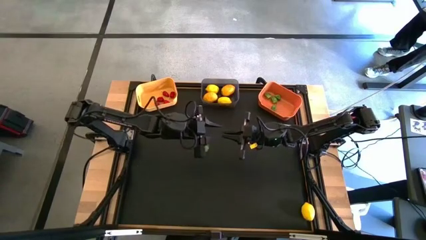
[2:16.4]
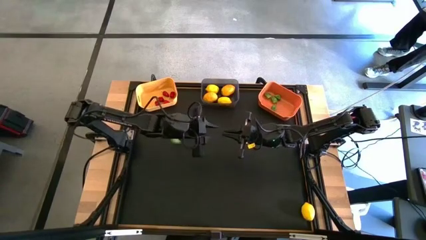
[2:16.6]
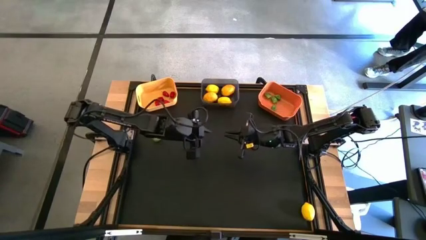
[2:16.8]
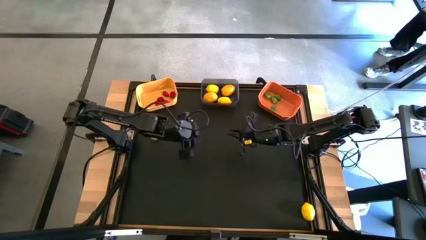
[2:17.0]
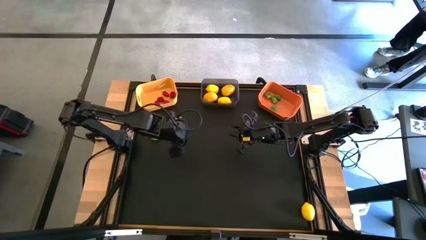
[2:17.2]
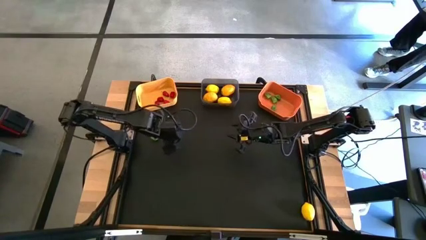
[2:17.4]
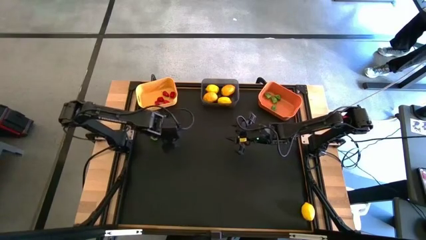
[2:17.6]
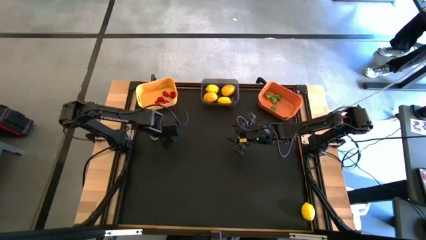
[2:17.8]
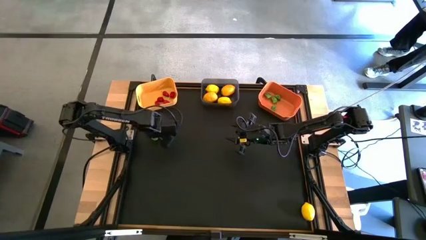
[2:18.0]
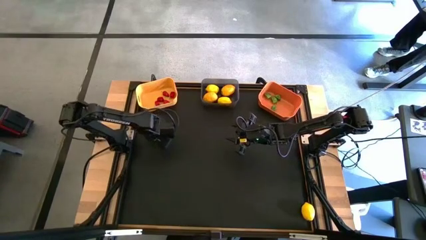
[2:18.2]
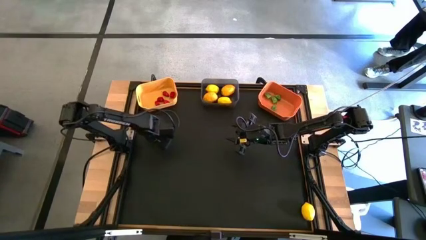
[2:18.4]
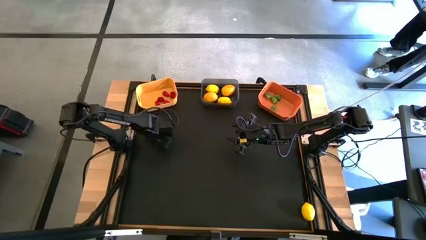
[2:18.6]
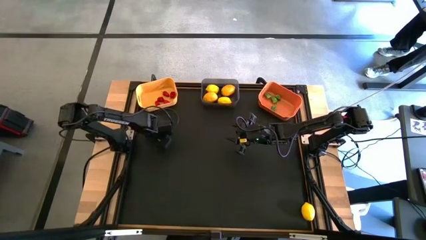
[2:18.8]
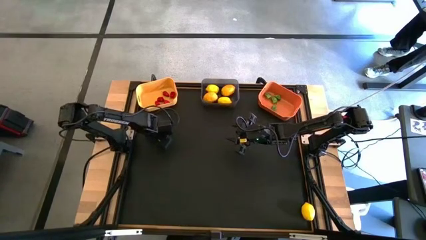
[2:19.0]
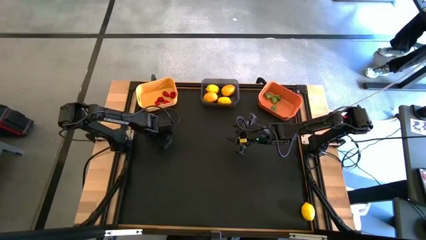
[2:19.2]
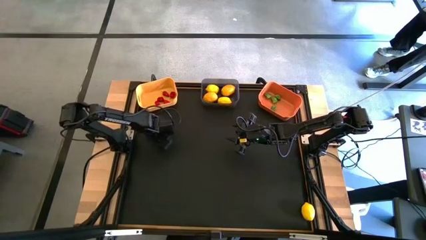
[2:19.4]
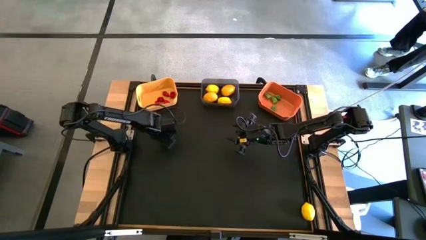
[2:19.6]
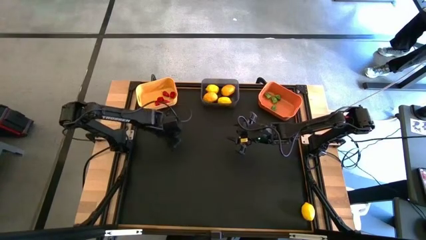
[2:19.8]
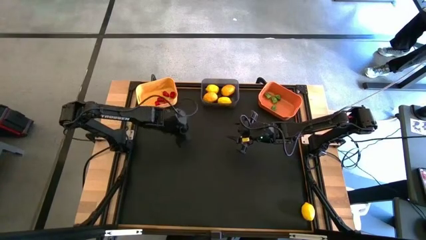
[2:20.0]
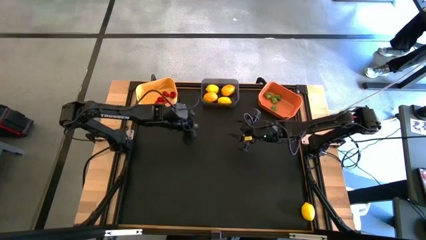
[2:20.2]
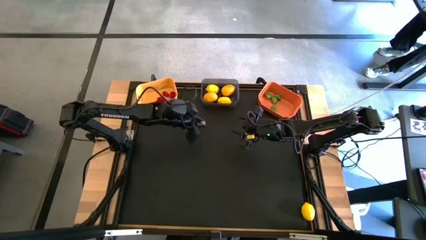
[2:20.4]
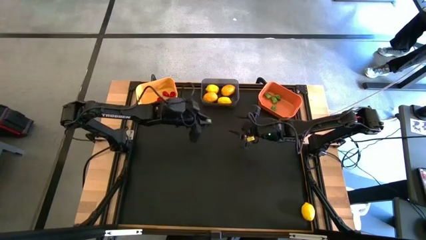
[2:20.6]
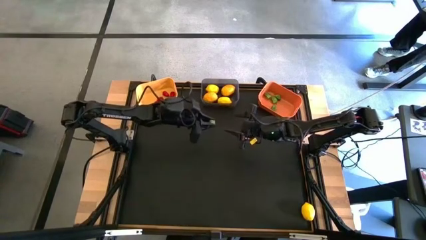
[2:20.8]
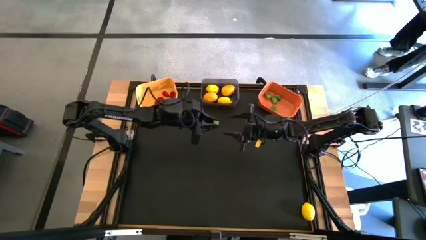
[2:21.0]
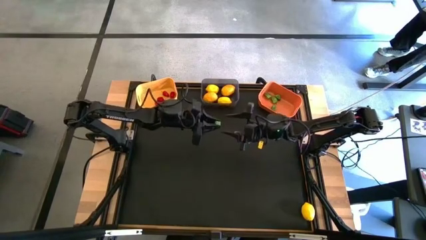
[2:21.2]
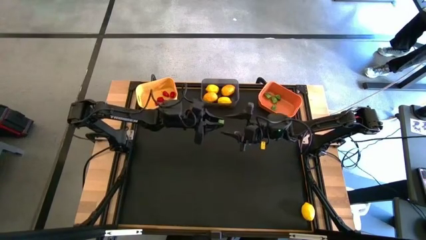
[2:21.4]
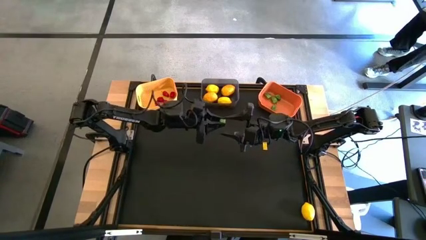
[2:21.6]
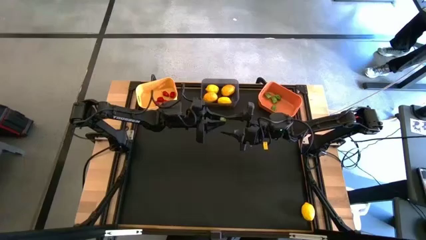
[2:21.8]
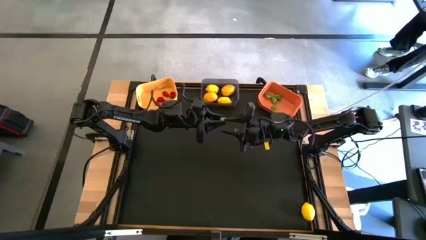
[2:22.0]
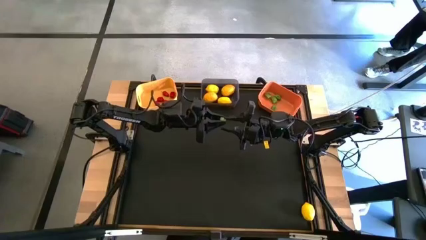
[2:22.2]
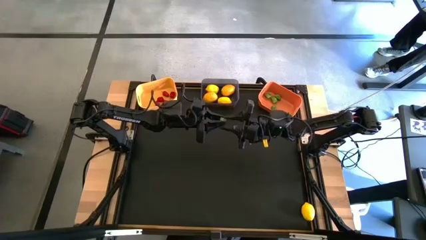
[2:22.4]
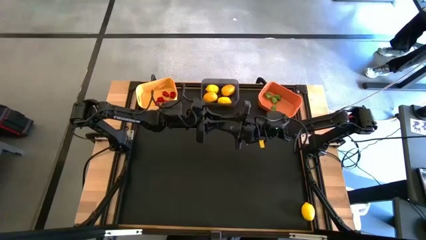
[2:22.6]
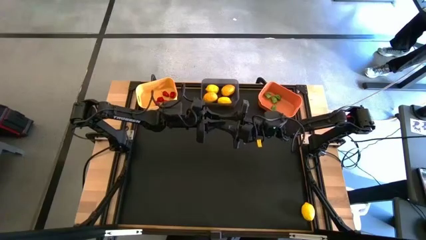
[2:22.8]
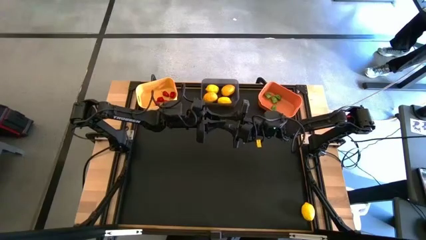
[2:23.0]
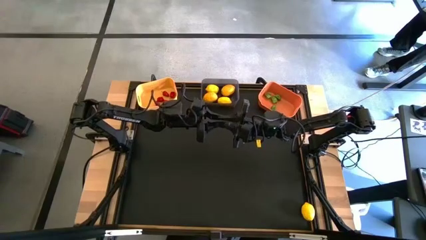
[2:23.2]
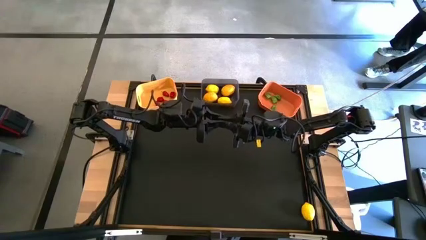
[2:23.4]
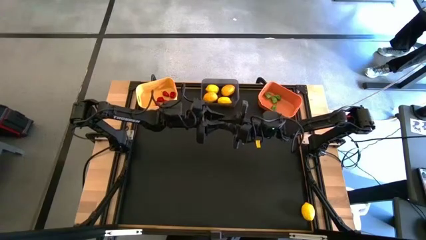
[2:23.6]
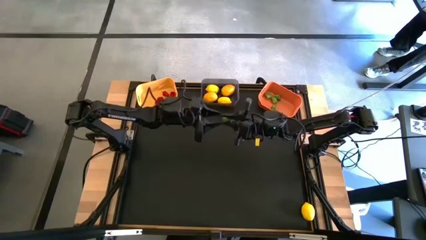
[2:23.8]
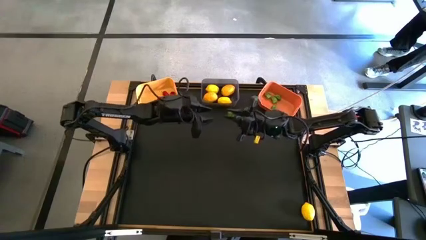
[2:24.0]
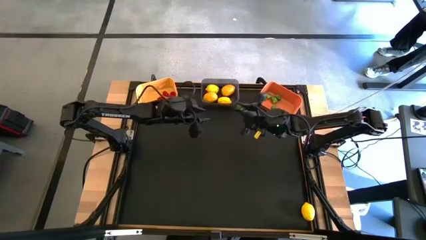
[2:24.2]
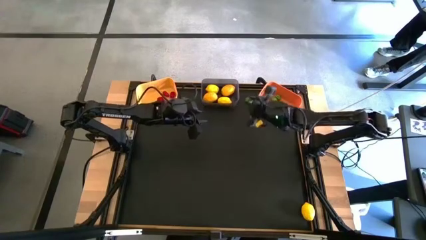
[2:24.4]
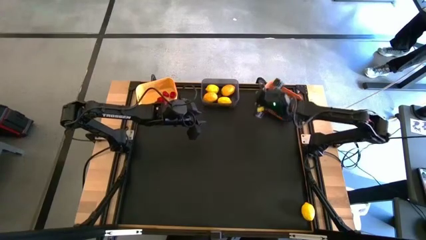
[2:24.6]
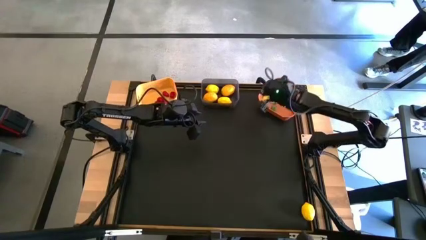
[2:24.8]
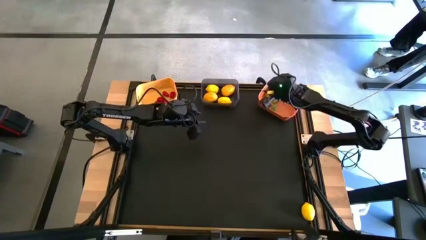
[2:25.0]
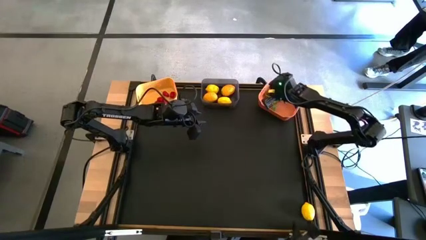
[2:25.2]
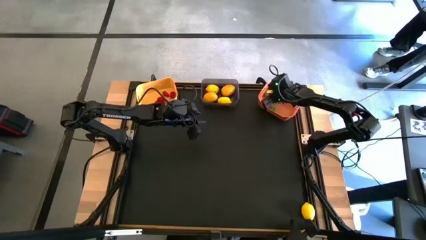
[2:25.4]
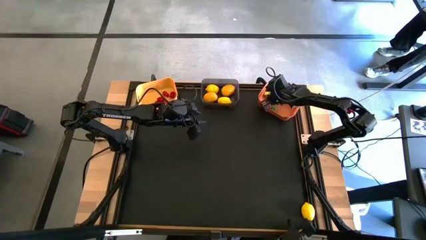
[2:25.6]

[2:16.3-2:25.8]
Task: Sort produce into baskets
Put the green chili pepper into the orange bin

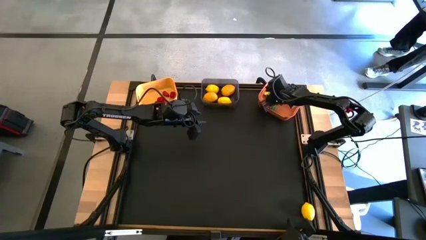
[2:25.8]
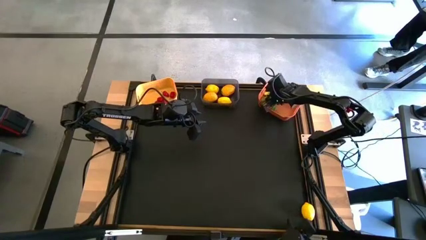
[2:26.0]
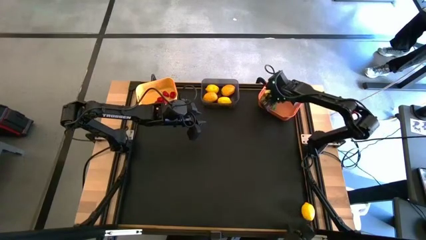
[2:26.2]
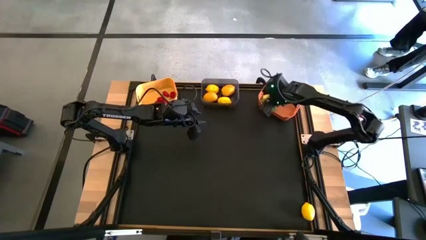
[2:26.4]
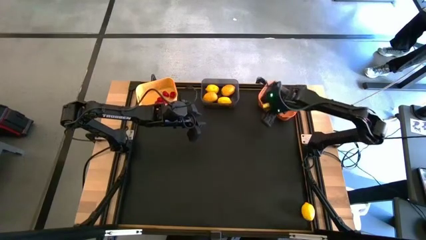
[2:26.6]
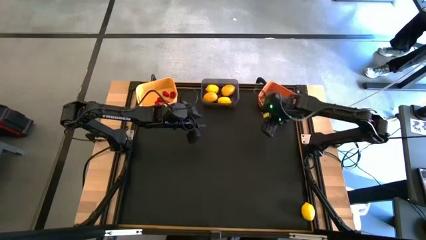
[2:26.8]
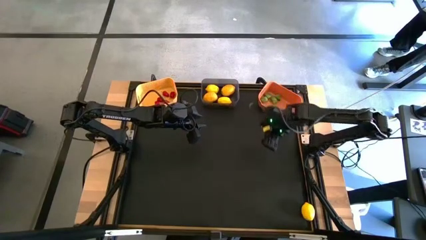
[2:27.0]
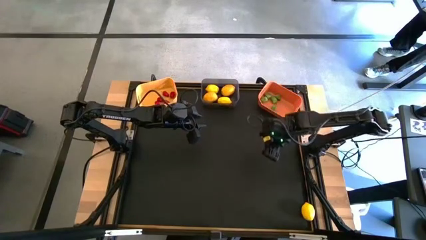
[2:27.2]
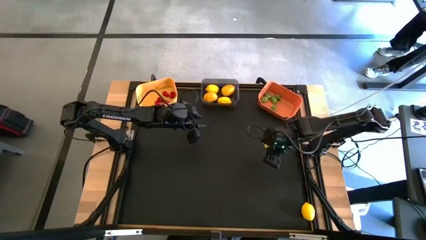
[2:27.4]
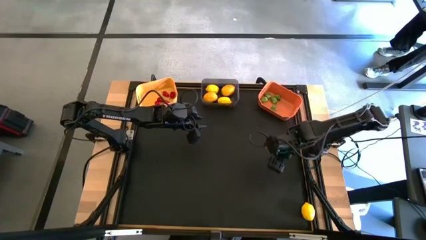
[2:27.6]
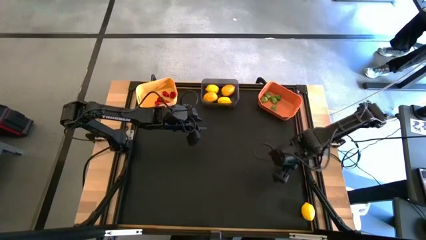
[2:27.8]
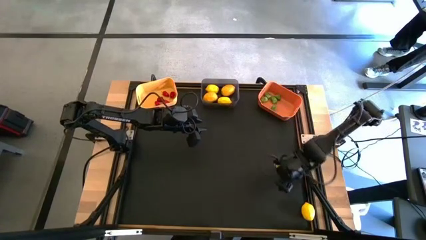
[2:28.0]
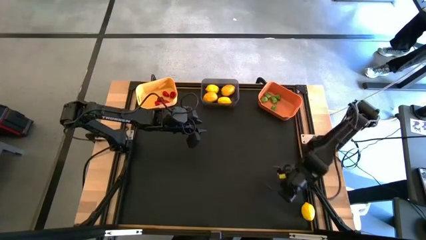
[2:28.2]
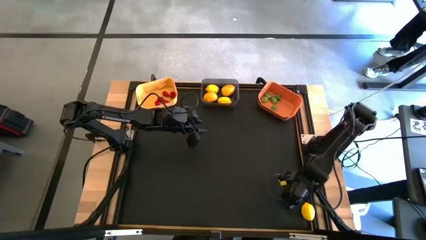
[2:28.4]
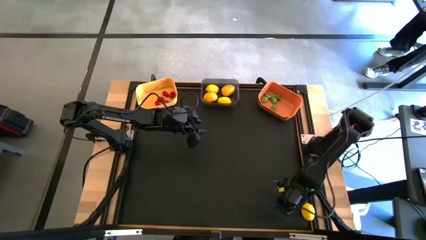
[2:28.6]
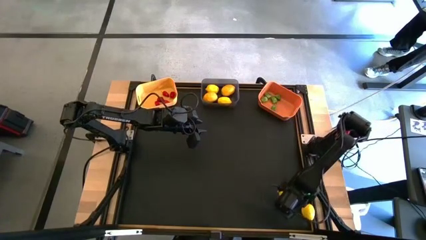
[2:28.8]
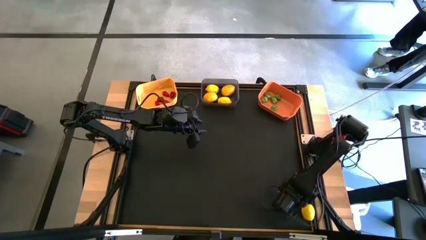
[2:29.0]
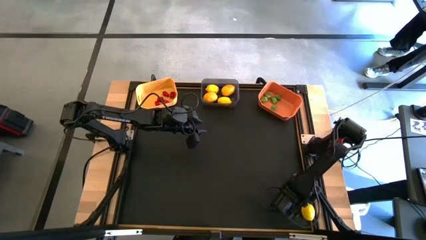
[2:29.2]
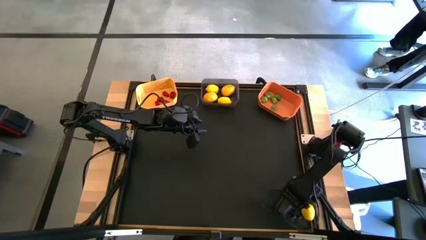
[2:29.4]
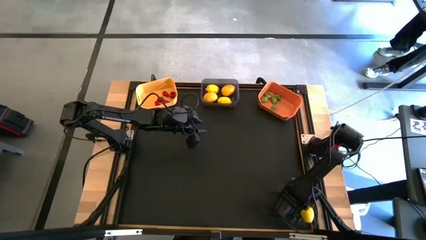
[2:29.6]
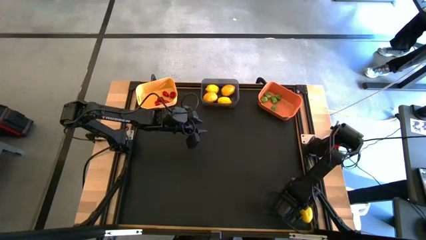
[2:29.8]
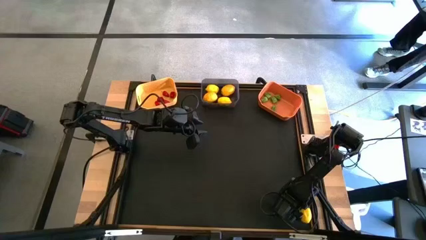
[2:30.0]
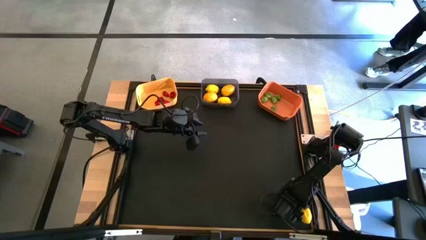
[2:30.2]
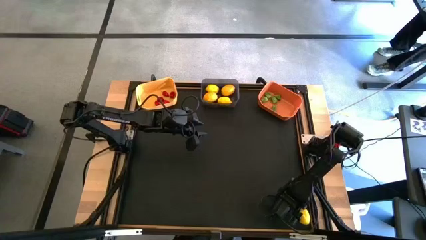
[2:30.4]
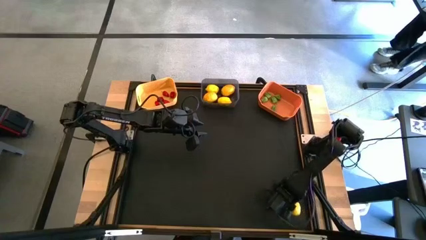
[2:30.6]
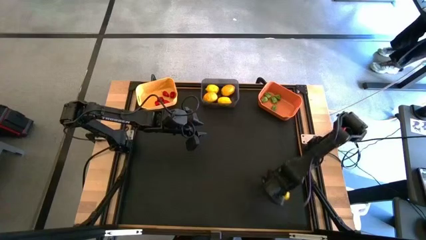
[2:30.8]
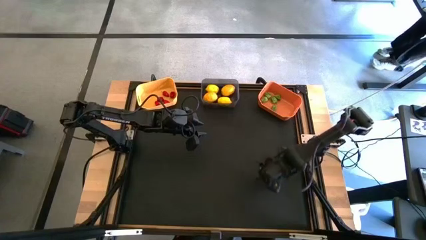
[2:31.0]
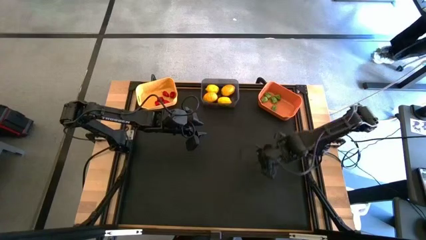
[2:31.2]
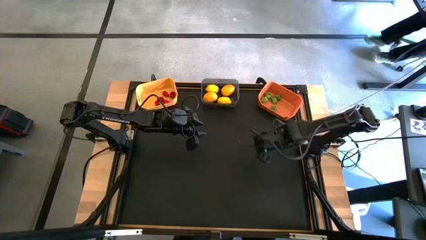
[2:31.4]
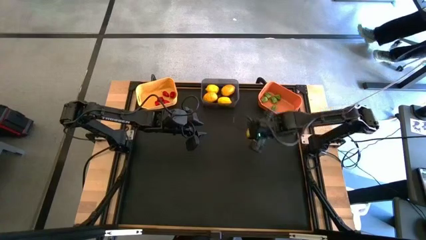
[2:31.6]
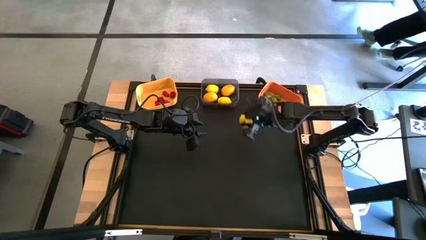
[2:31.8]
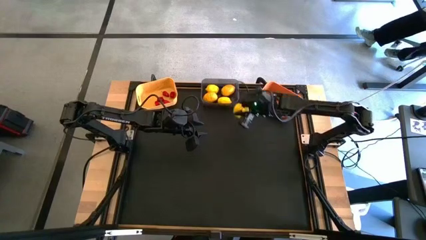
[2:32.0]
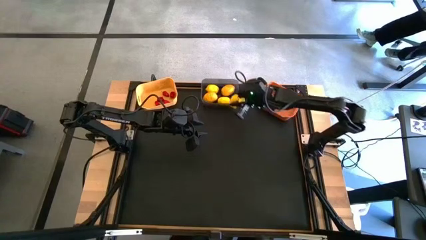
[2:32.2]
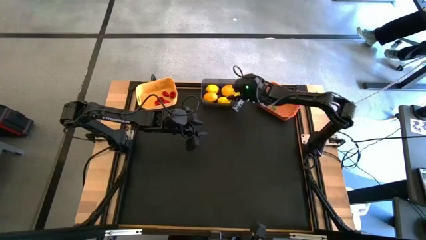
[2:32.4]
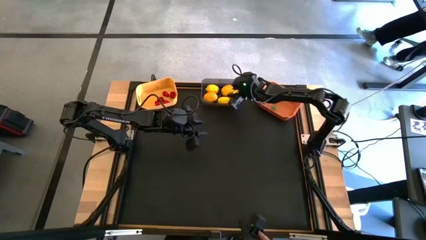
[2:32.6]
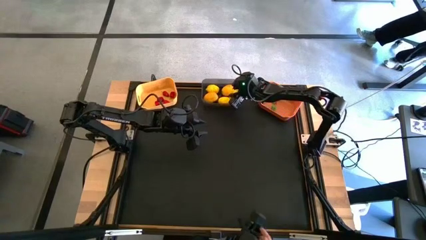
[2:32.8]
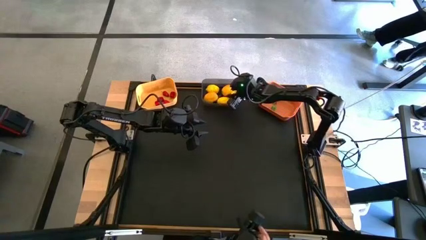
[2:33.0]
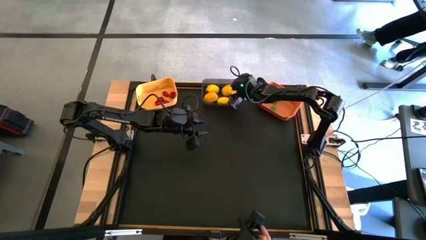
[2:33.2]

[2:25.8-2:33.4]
Put the yellow lemon into the black bin
